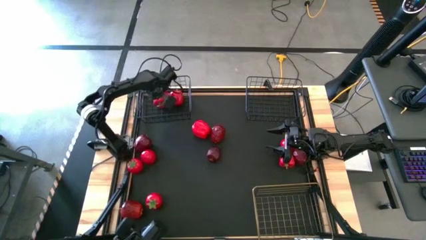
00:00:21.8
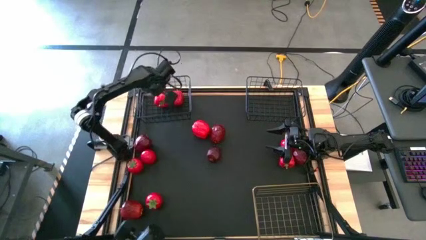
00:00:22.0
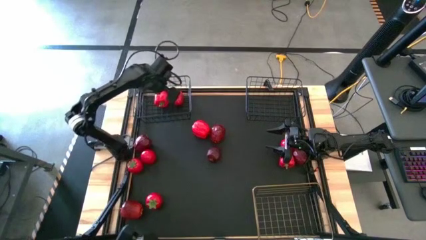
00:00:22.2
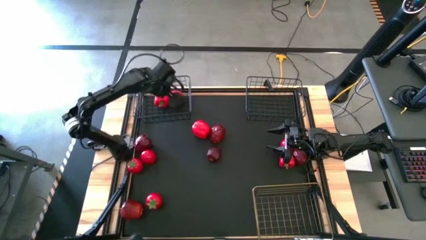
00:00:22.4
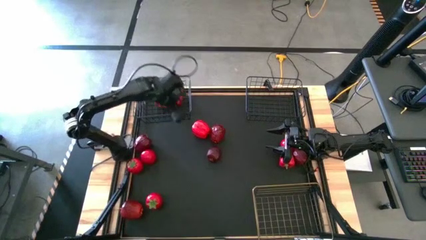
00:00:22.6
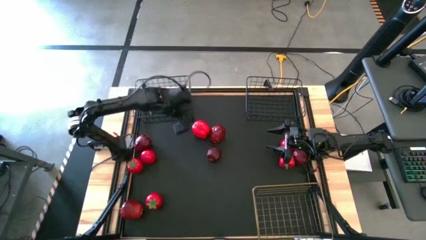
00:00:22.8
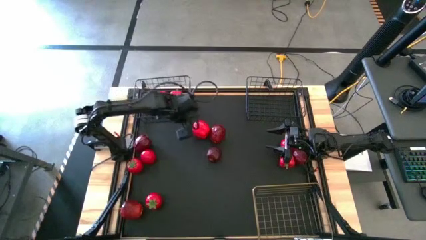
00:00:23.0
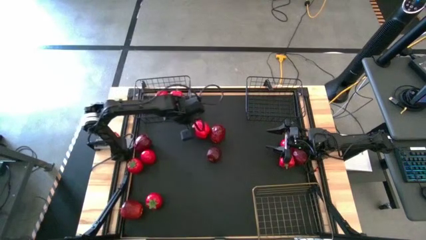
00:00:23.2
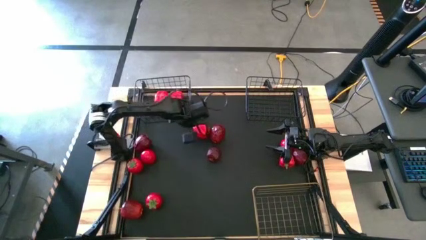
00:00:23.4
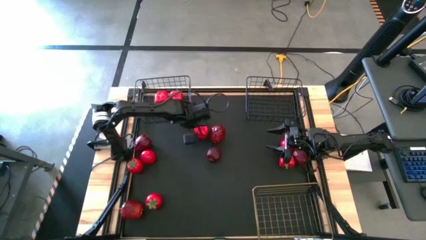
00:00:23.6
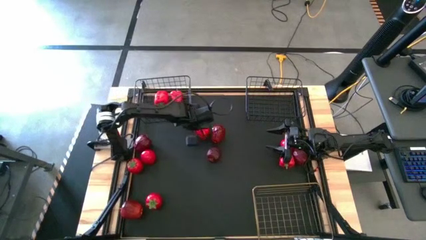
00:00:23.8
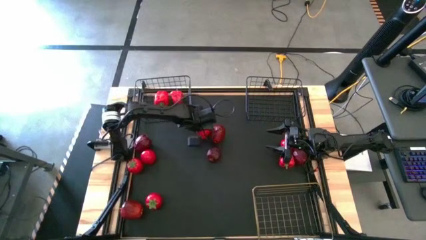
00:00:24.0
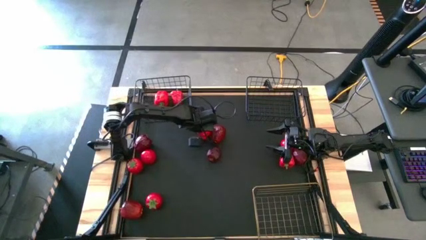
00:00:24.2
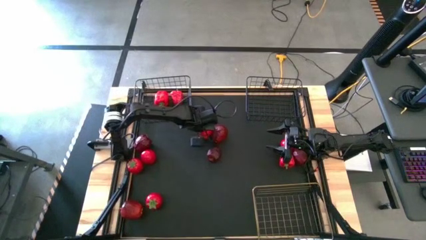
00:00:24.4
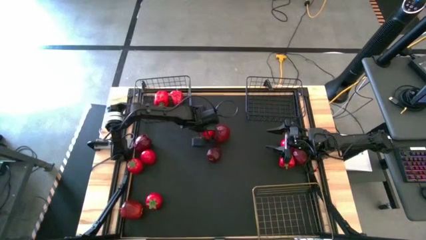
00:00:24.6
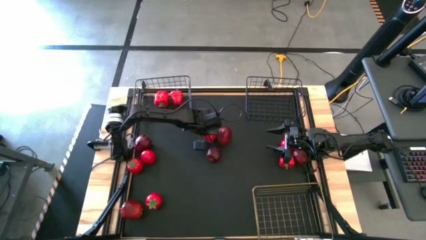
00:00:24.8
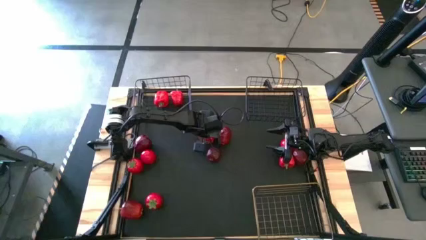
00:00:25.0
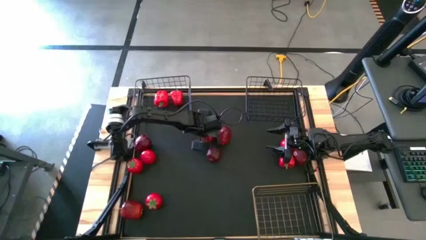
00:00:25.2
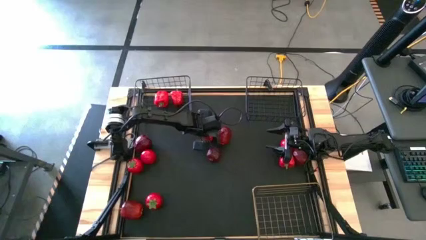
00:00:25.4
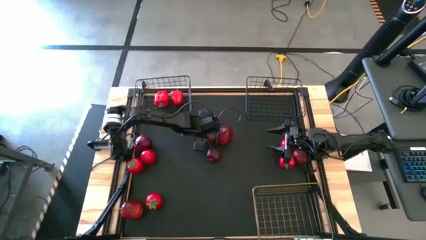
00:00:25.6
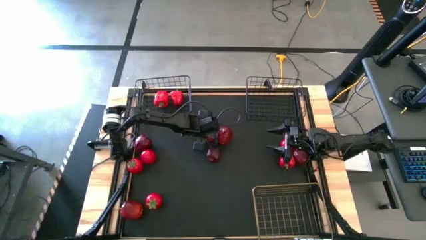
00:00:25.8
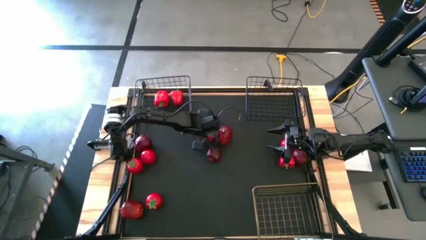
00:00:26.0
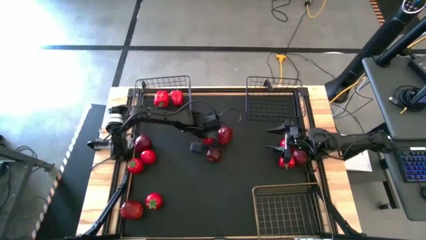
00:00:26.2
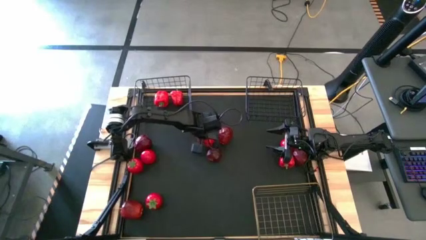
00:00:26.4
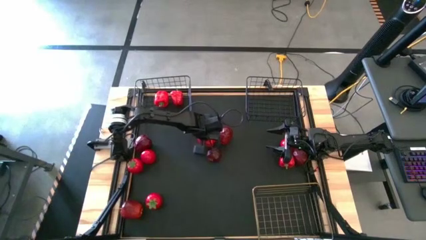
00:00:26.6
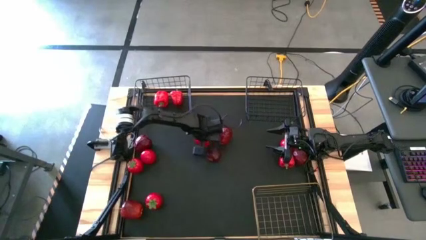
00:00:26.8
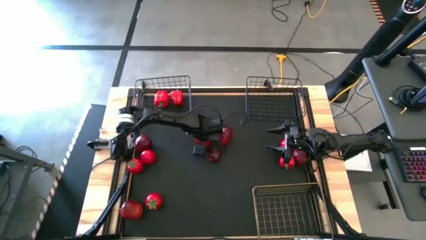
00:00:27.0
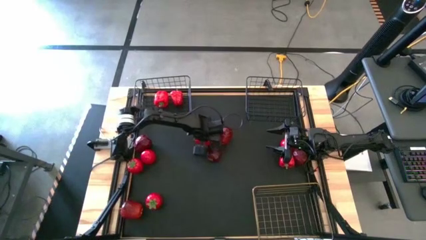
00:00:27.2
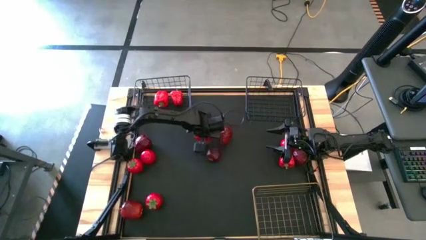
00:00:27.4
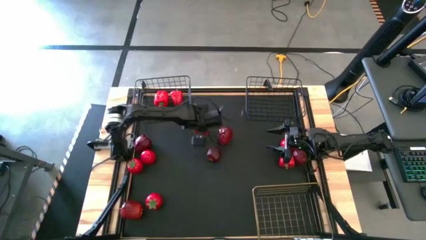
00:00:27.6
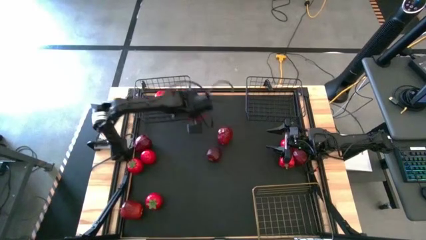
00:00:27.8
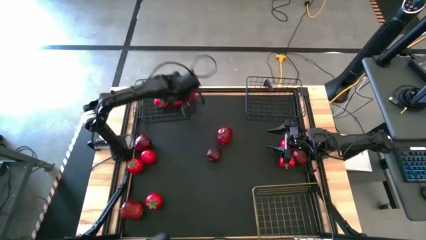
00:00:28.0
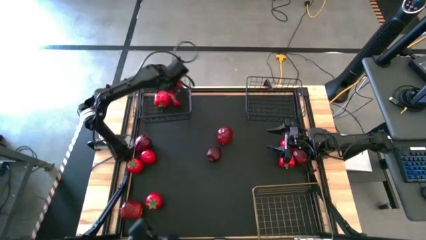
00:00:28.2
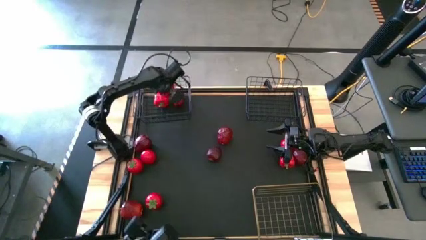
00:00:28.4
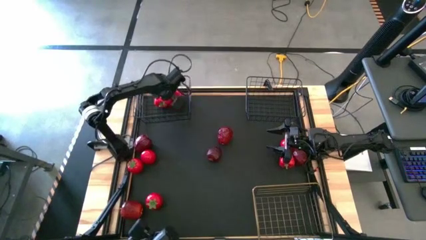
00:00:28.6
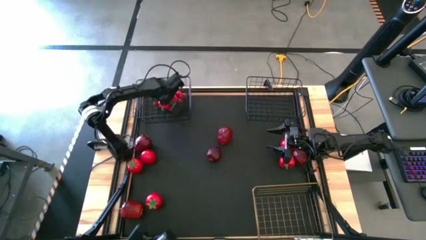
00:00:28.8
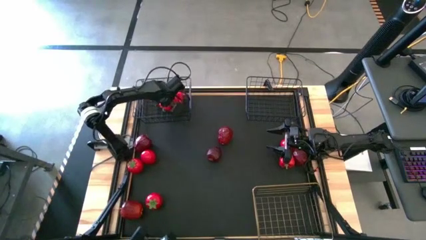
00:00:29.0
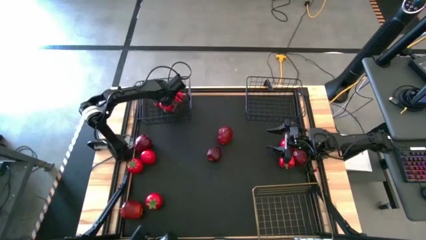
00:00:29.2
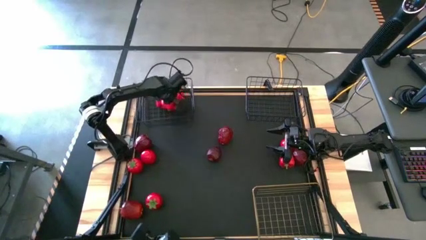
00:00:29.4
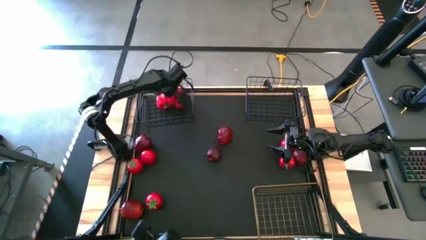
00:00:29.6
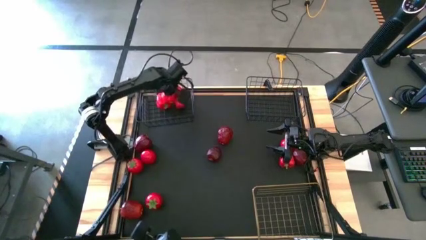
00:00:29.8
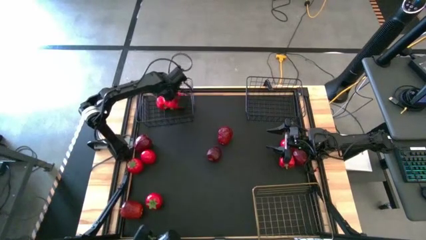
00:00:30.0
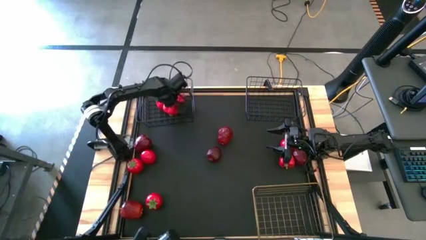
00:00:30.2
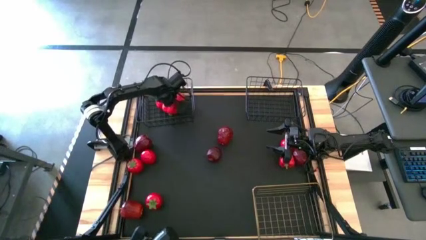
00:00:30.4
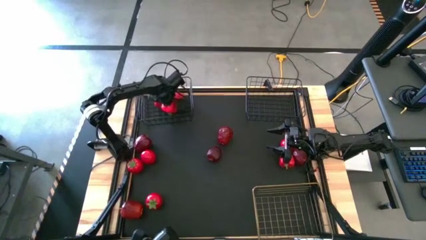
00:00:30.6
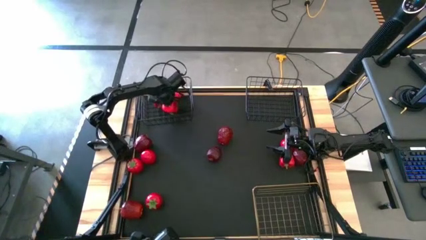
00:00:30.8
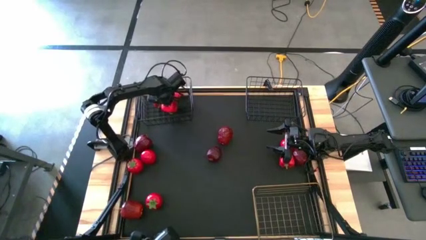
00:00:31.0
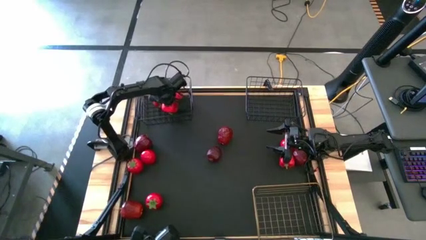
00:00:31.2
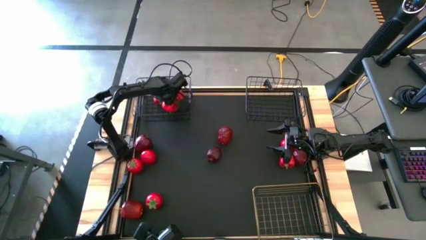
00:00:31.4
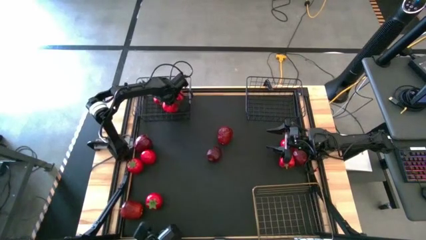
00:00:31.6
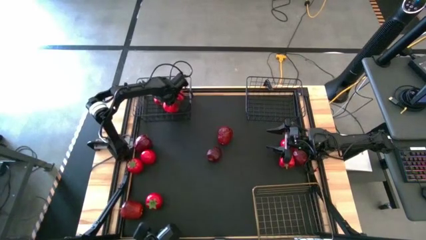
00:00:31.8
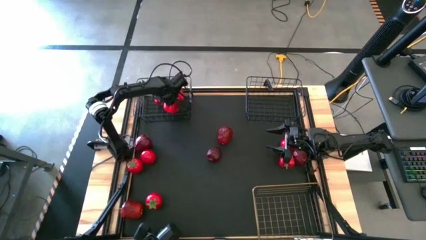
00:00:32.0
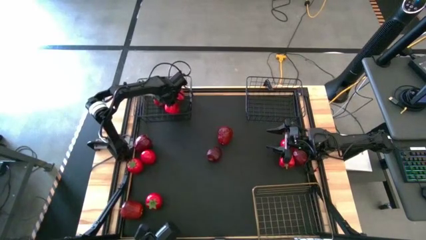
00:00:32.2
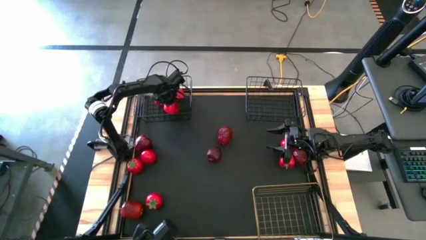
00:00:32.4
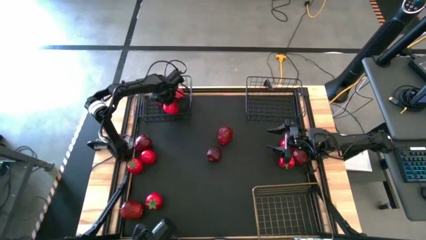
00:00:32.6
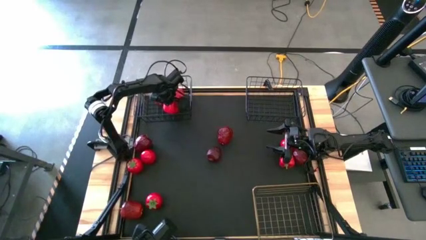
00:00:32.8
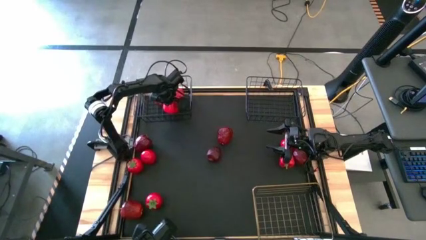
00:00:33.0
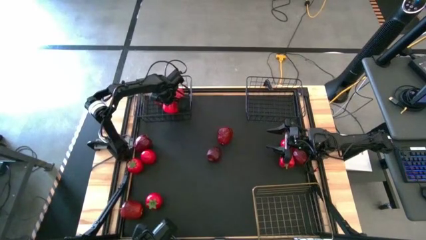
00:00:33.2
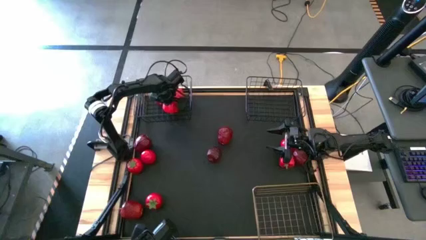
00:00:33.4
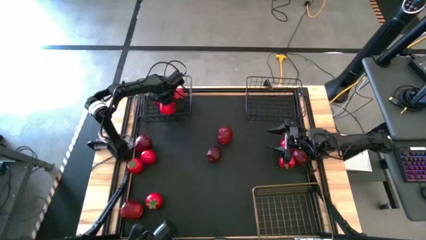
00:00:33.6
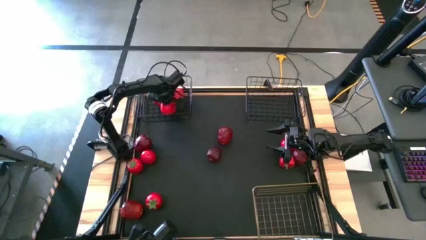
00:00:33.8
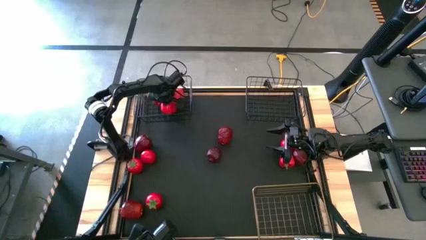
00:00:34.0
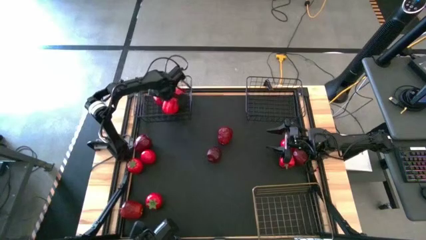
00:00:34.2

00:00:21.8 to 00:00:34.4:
Task: Sort produce into baskets
Put the bell pepper into the left black wire basket

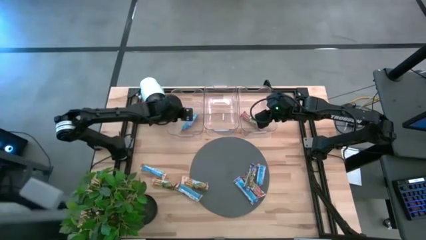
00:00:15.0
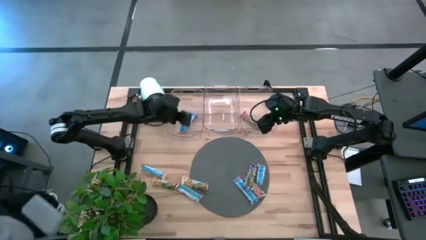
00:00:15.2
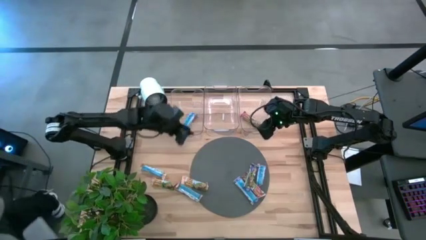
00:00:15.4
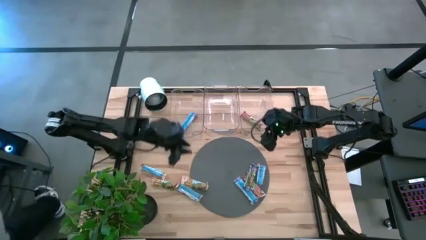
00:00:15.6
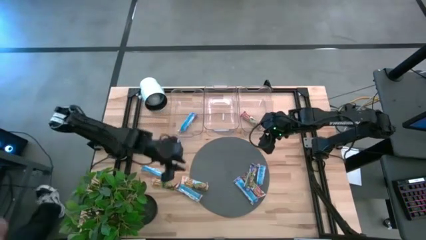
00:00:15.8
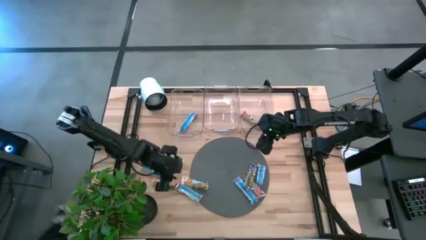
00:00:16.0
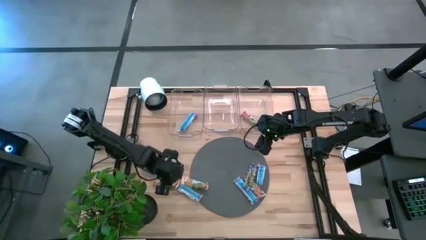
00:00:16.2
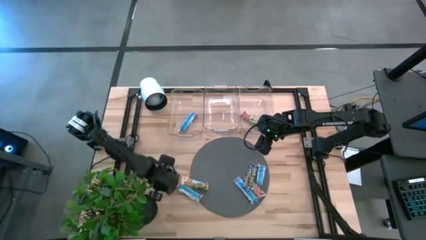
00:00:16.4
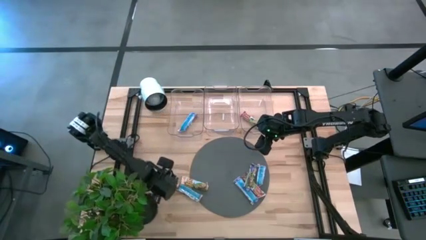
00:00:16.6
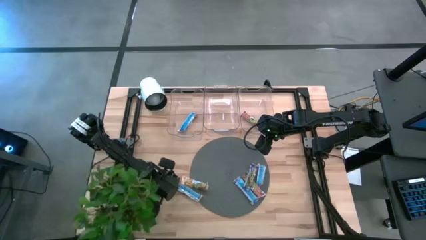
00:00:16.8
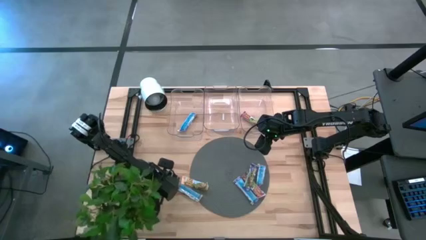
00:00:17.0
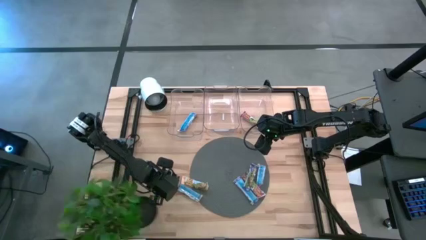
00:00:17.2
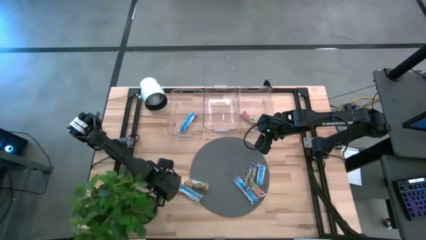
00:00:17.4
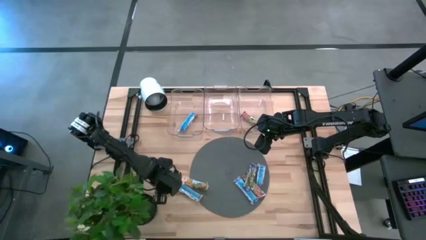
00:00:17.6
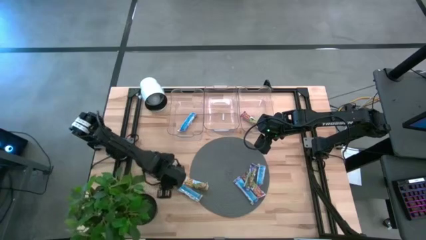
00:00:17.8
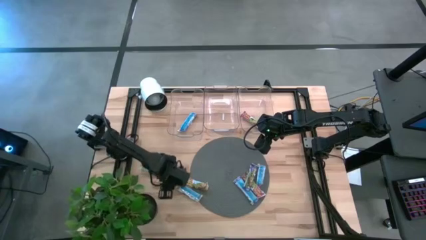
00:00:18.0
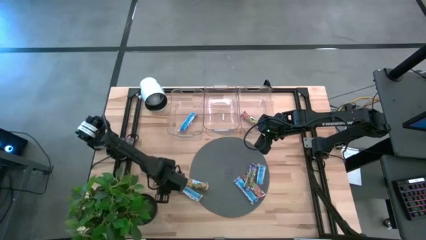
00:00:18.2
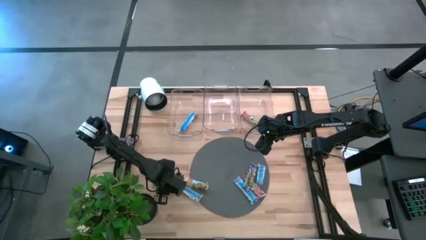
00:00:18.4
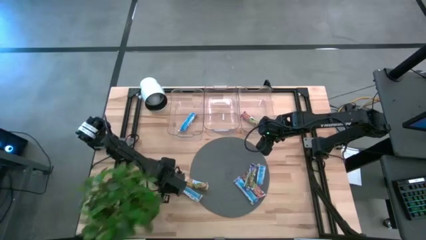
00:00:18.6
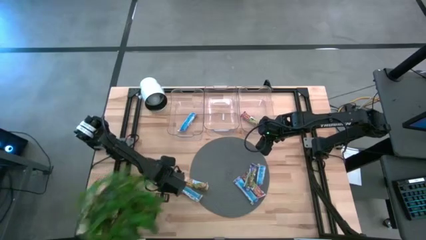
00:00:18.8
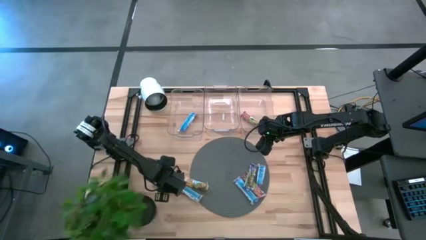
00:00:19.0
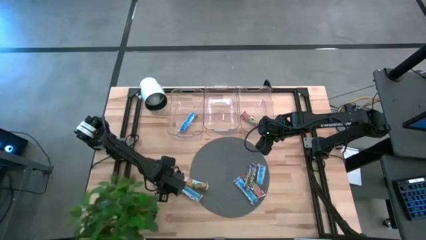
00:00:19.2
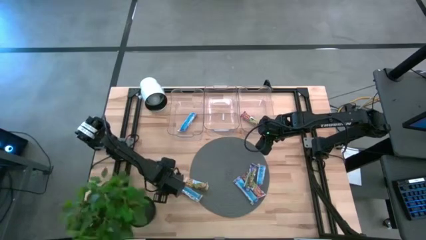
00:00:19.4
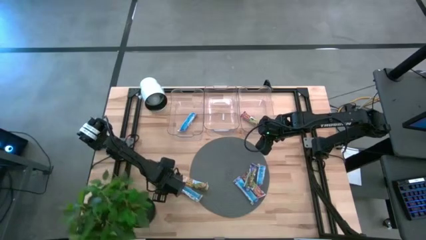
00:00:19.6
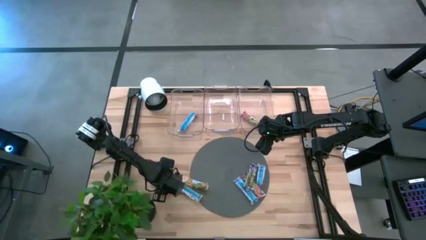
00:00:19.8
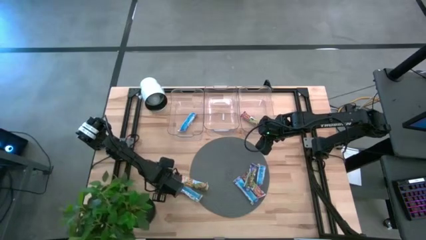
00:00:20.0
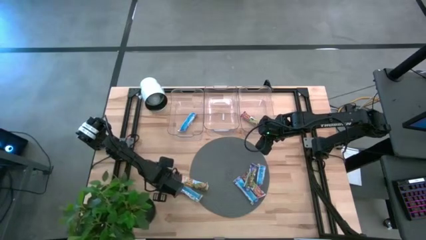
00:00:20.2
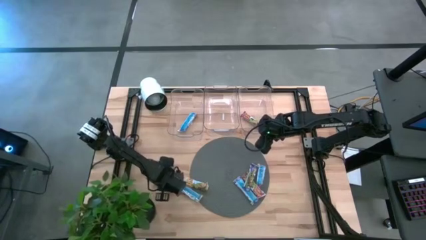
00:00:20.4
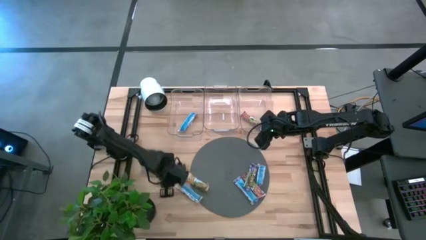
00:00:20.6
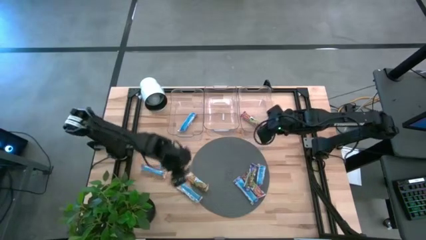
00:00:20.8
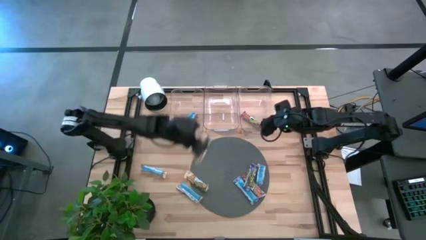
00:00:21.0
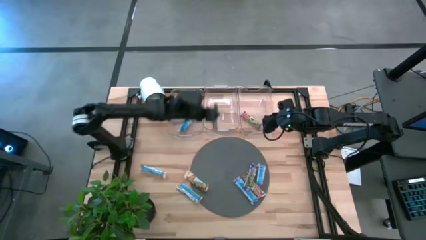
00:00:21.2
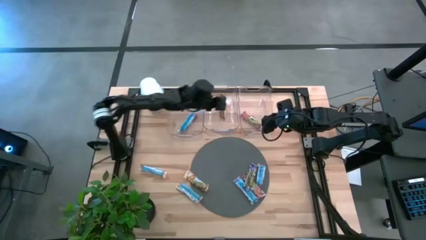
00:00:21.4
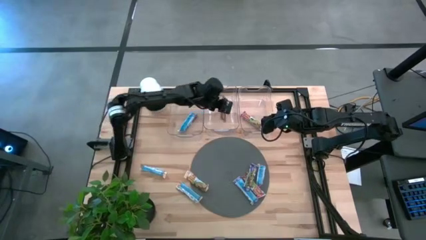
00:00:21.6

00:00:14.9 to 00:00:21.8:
Task: Pick and place Granola Bars by type
Put the yellow granola bar into the middle bin
